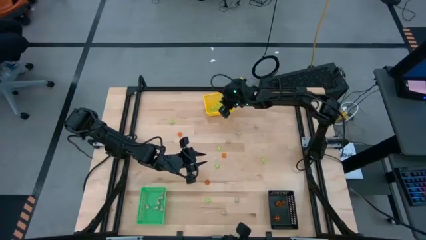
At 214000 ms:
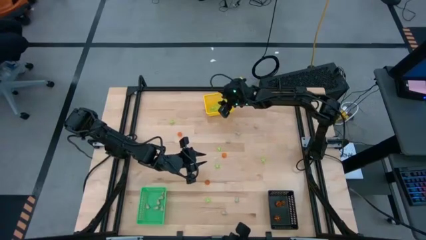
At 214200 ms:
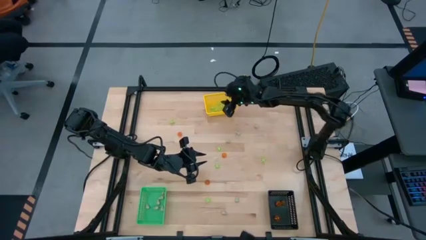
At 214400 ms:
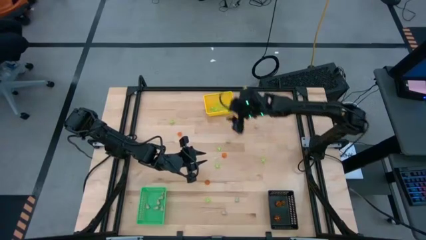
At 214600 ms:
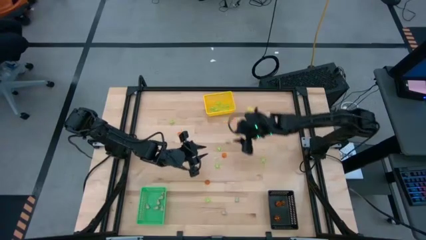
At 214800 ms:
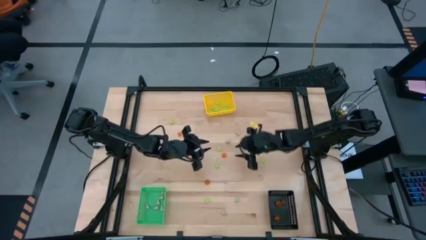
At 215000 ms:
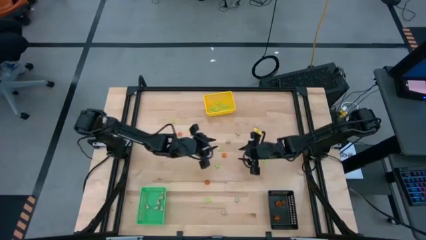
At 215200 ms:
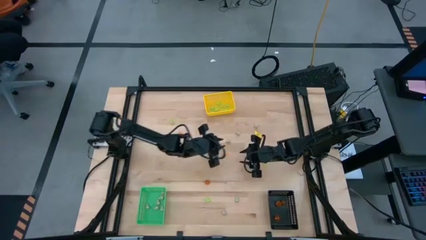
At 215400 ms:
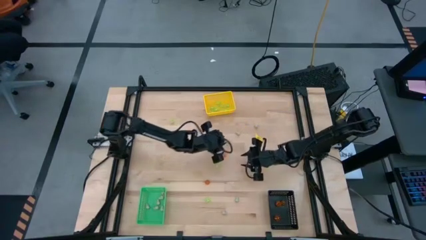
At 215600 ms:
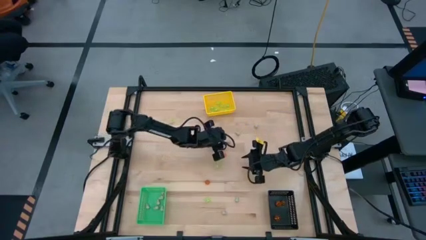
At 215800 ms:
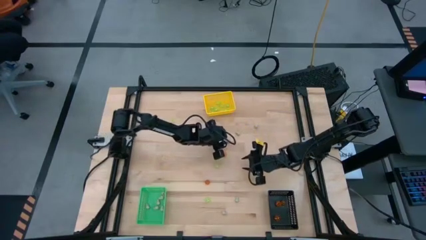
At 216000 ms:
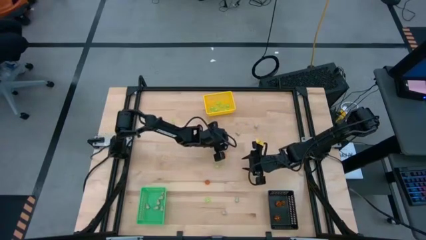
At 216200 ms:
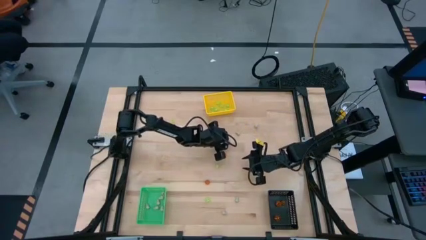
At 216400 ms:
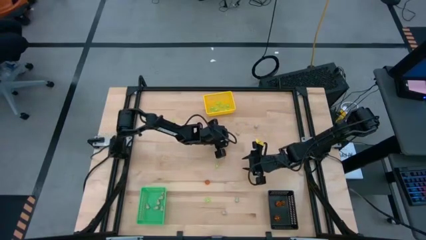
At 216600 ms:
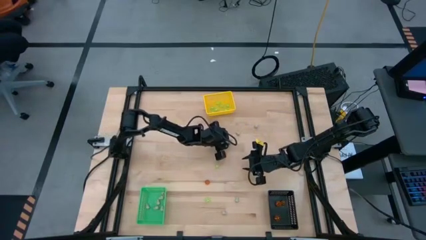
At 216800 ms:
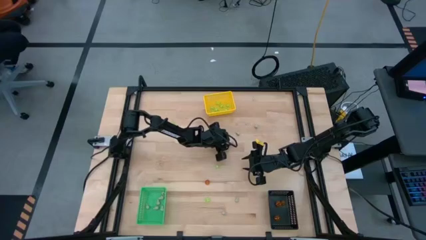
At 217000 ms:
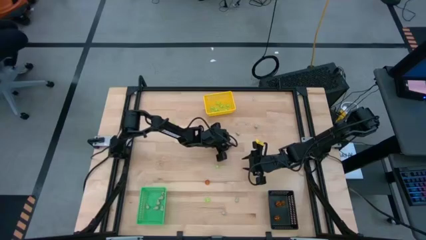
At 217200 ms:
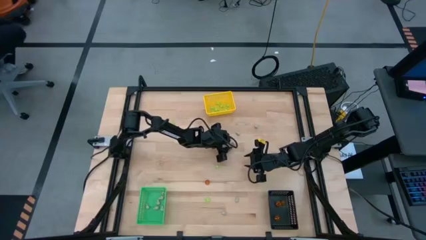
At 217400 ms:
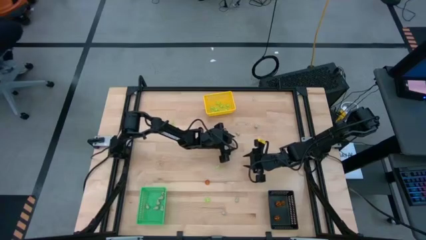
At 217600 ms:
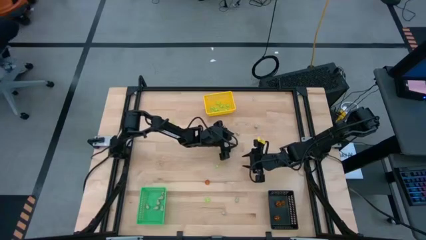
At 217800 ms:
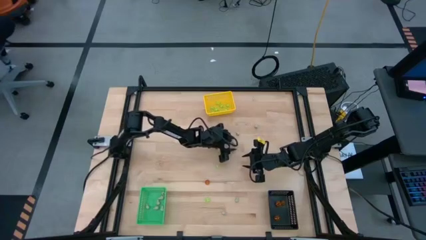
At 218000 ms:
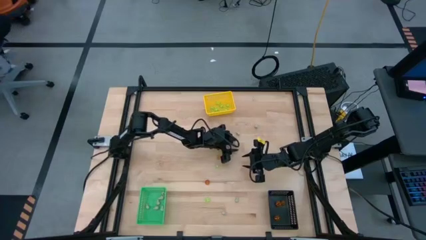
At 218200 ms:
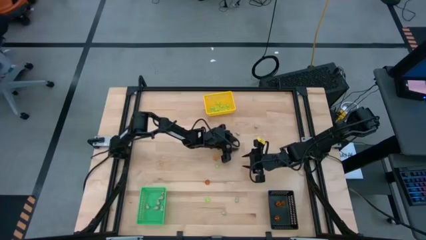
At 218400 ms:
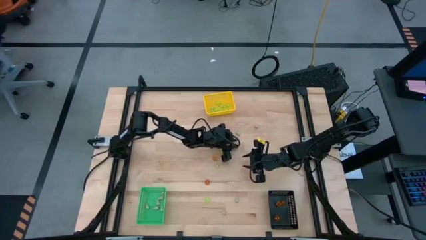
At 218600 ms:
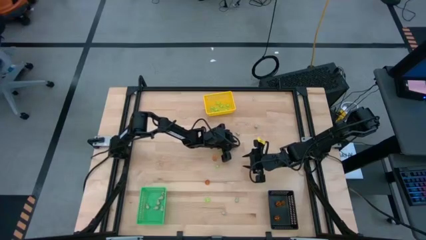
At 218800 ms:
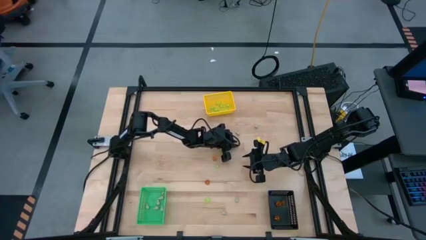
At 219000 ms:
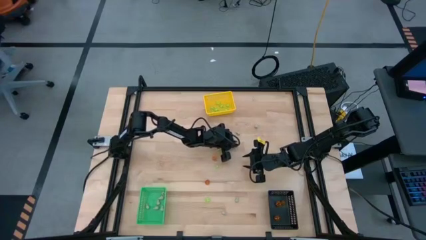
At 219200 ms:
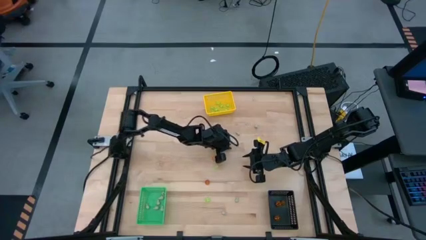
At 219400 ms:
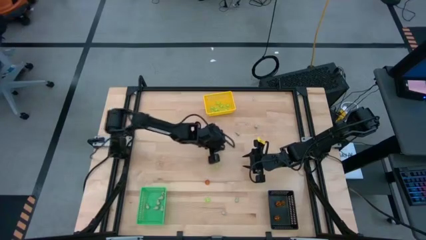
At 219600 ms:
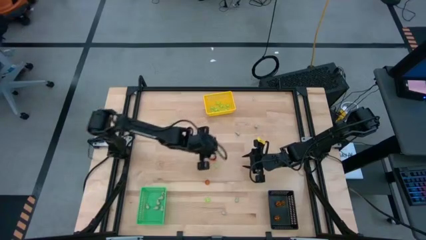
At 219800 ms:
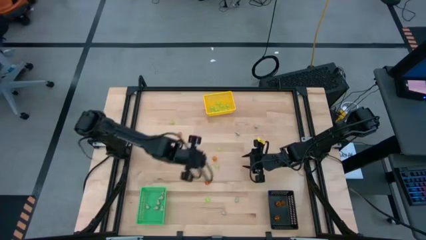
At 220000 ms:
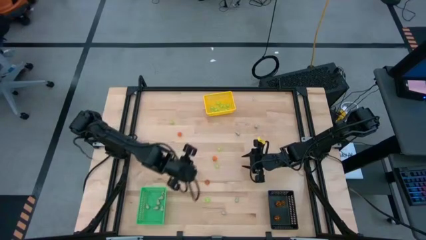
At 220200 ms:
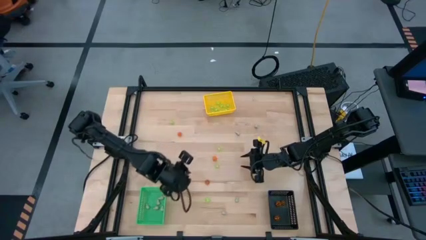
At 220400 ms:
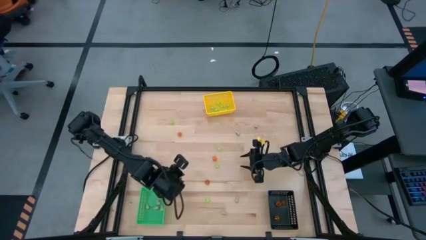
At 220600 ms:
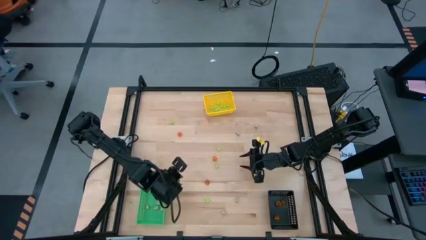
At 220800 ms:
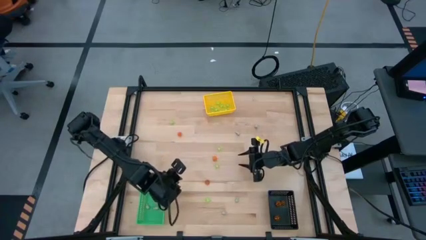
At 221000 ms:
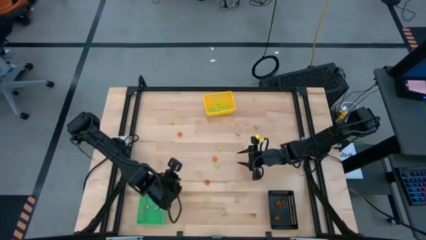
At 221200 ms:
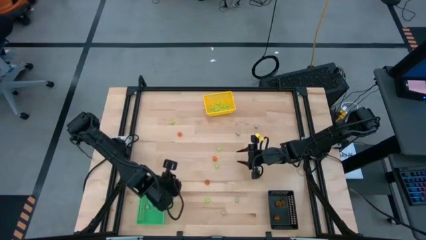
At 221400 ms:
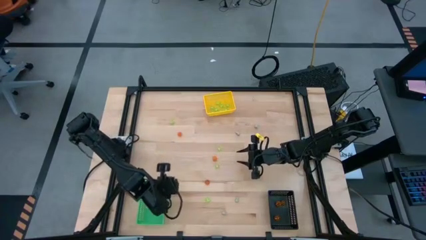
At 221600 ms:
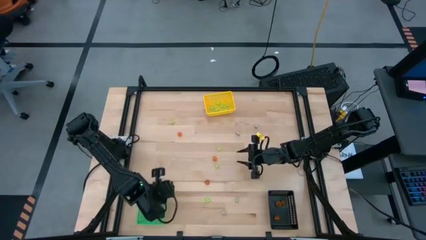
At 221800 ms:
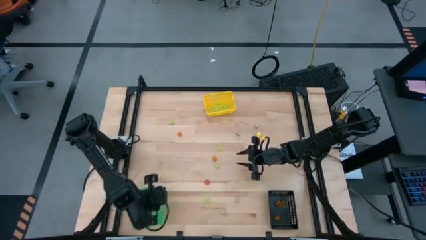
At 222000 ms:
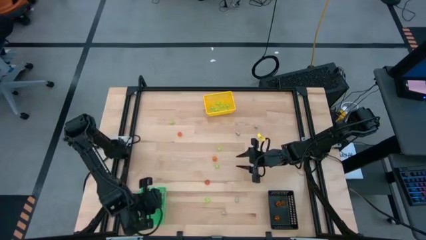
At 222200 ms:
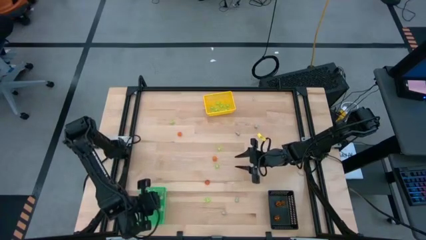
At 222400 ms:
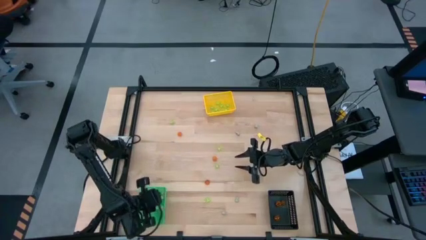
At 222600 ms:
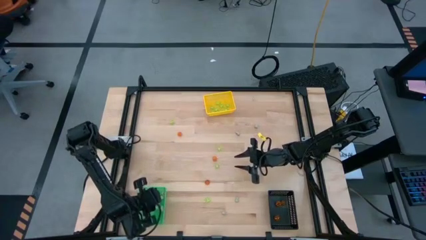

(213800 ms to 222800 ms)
Task: Sort Halloween decoration
Put the white skull toy into the green bin

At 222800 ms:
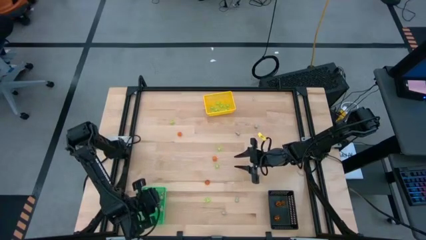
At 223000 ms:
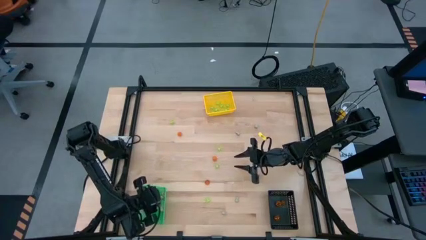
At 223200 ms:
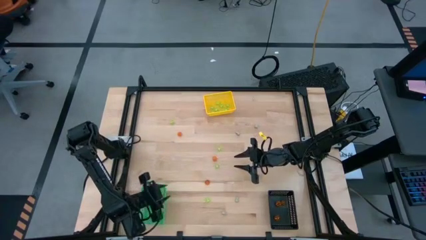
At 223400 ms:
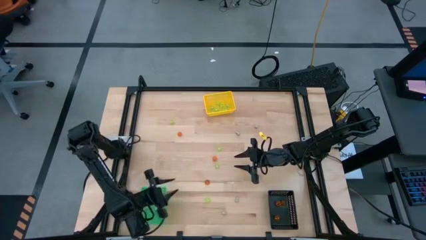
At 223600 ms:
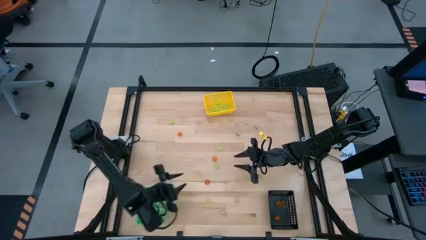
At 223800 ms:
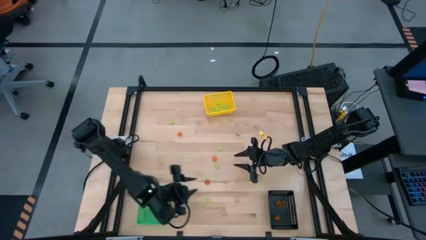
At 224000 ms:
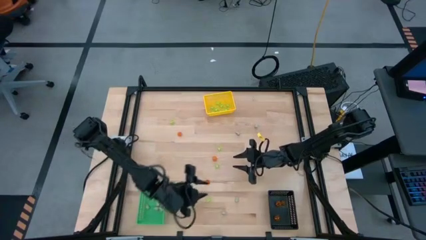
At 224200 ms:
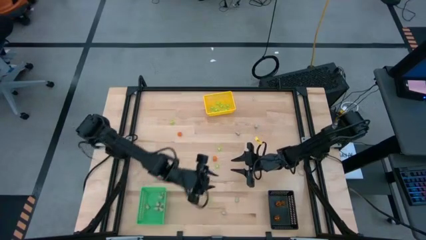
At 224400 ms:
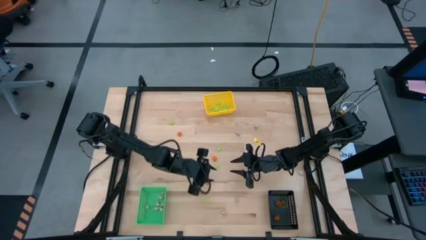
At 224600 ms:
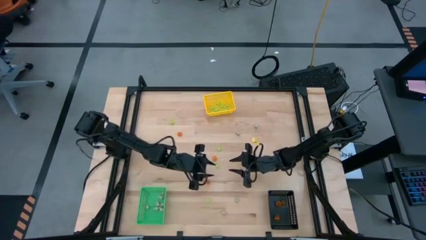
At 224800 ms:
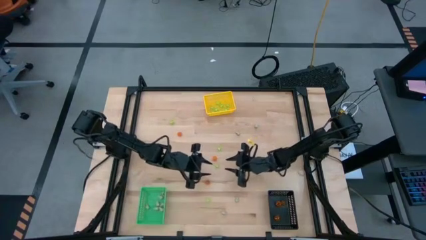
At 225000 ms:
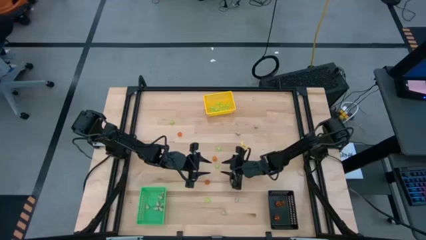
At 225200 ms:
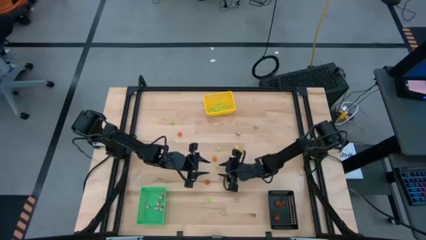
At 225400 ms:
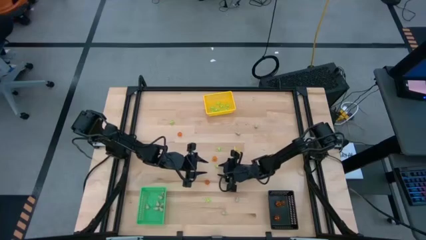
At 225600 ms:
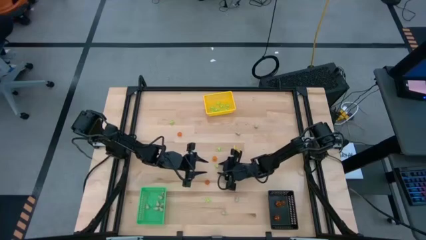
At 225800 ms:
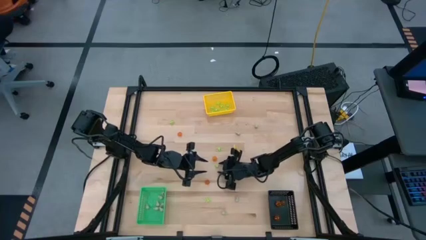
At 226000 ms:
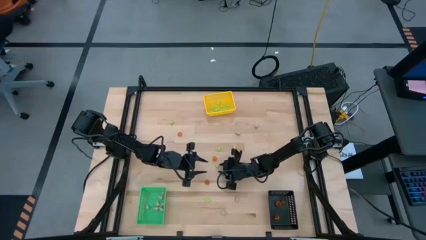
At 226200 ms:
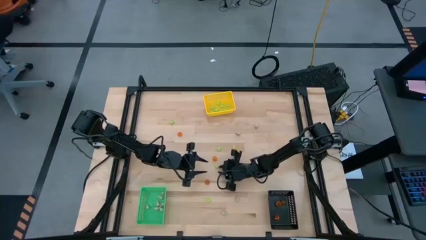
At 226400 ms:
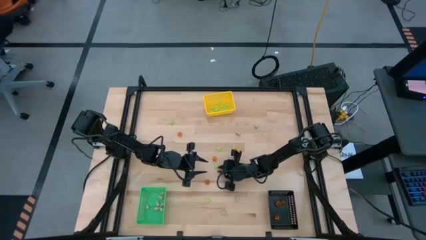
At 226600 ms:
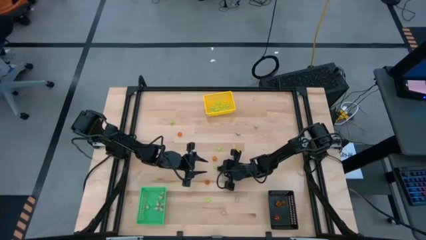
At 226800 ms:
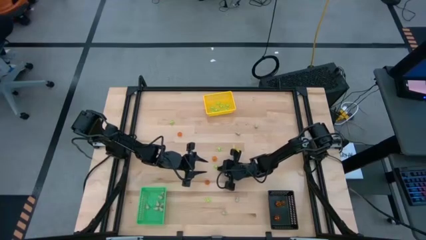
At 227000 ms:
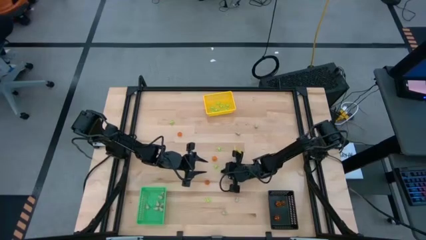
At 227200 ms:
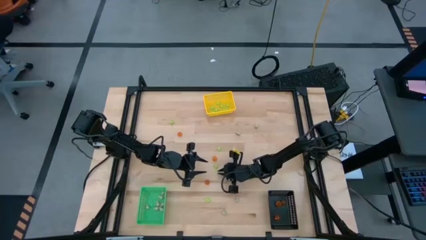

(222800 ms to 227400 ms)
Put the green spider toy into the yellow bin
